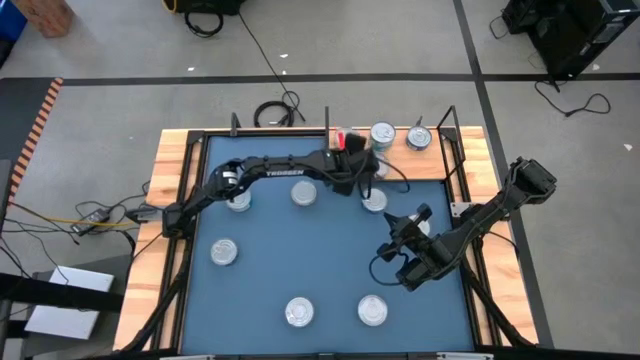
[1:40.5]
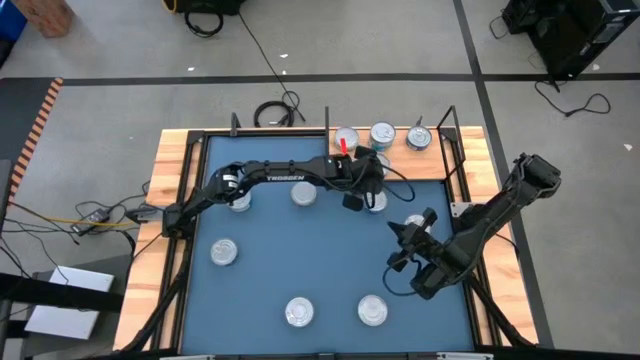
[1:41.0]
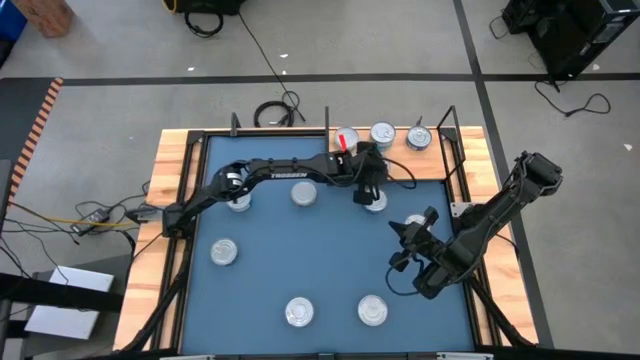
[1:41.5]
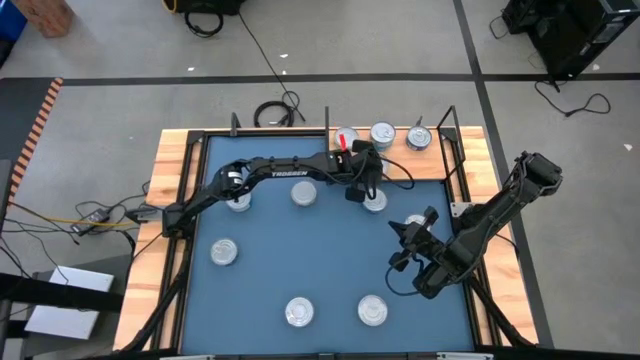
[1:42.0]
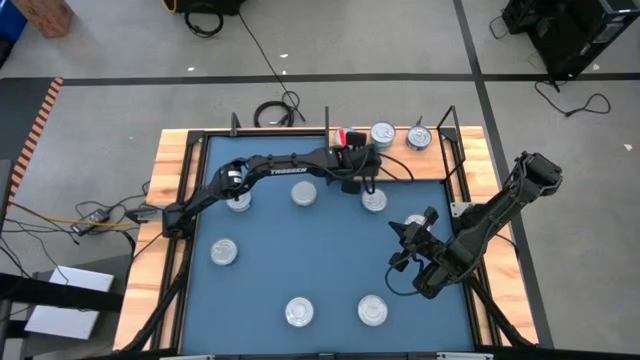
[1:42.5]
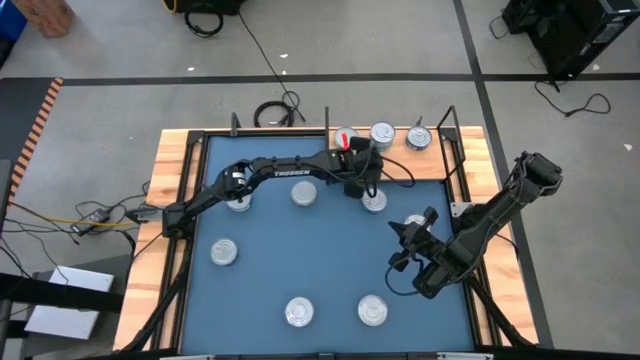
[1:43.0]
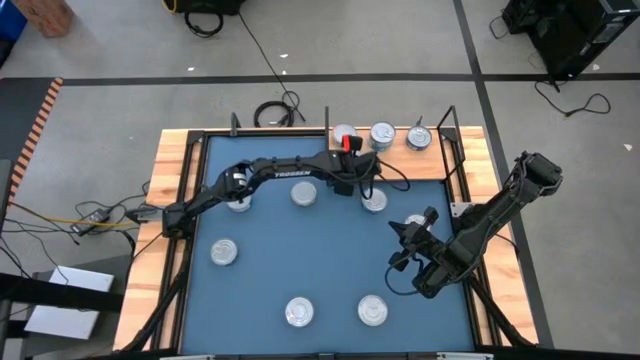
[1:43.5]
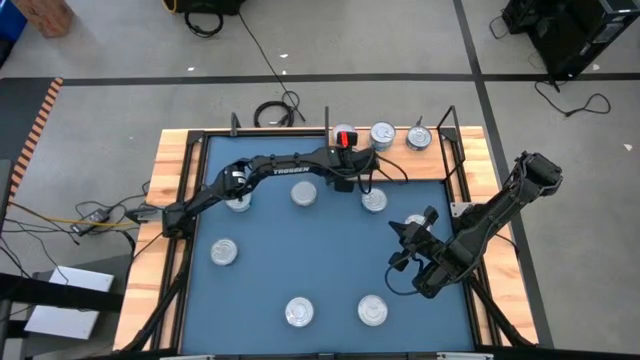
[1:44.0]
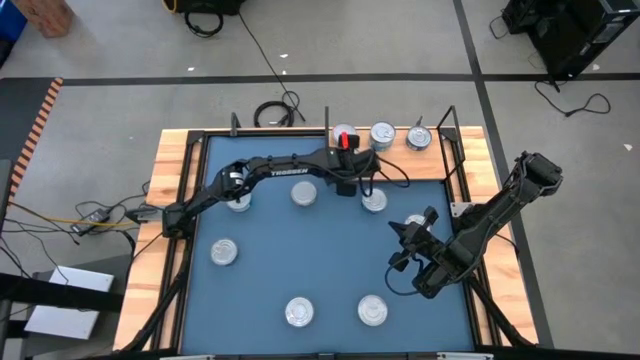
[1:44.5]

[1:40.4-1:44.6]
Task: Stack canned seafood by type on shelf
Adjust the front green tuna can on the shelf

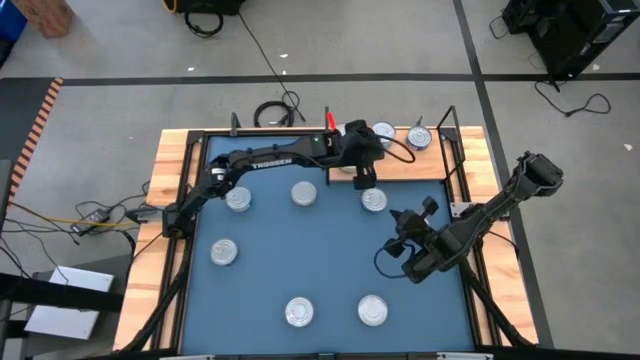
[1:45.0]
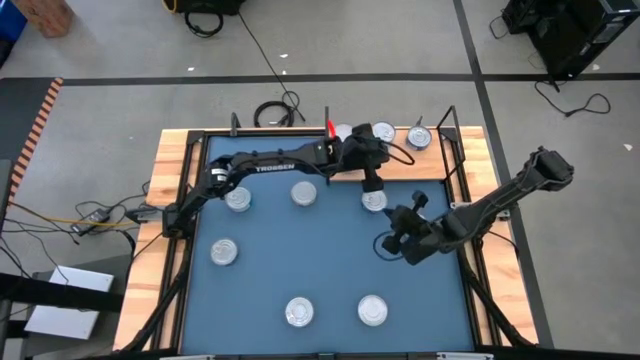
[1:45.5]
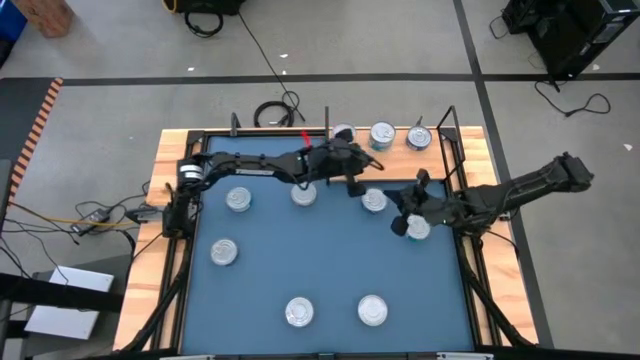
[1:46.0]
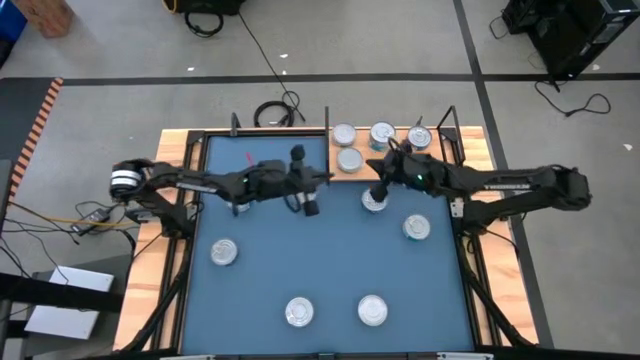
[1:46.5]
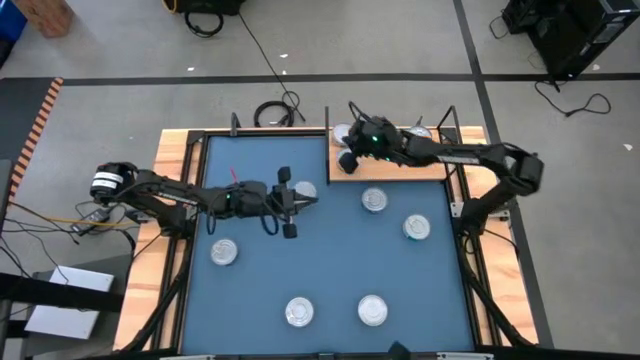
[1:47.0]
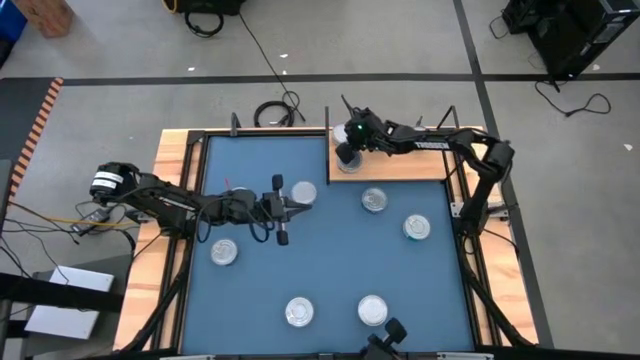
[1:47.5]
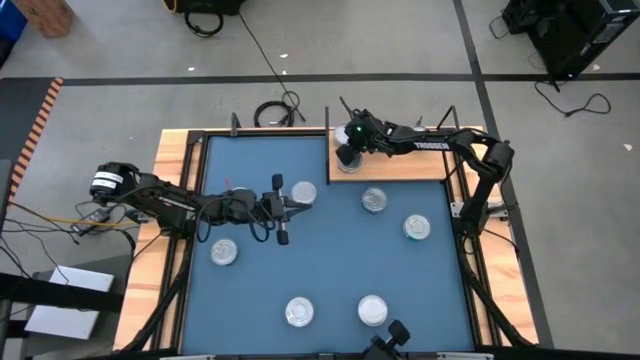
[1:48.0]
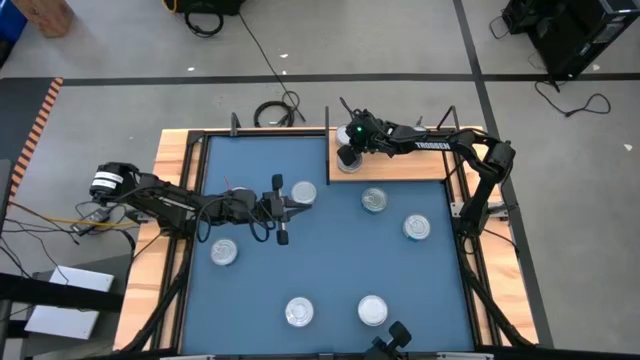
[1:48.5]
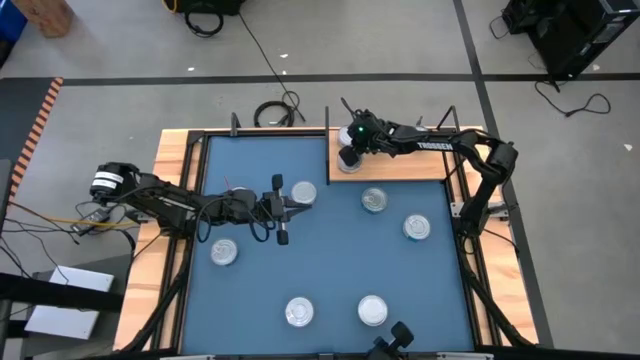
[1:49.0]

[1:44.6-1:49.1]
Adjust the green tuna can on the back of the shelf

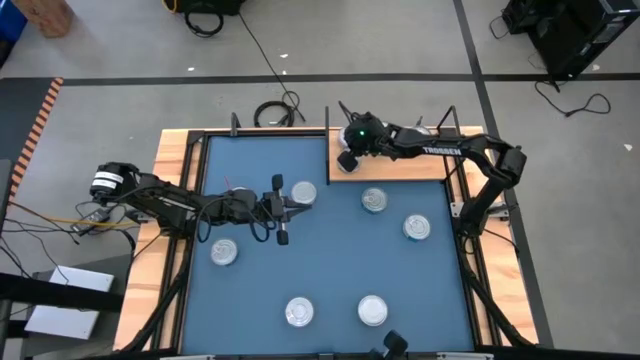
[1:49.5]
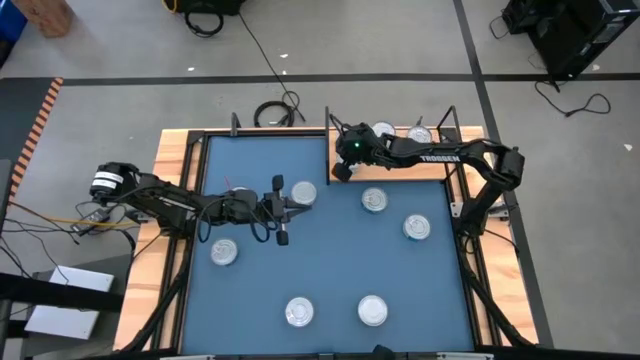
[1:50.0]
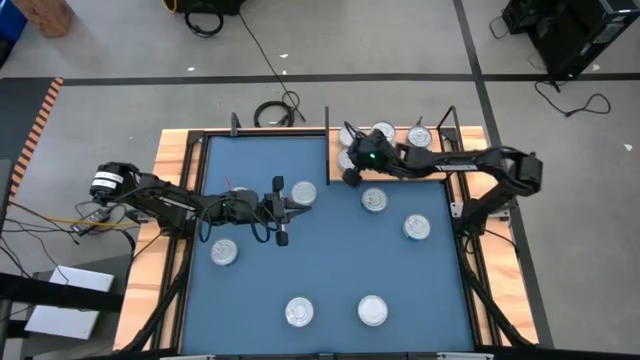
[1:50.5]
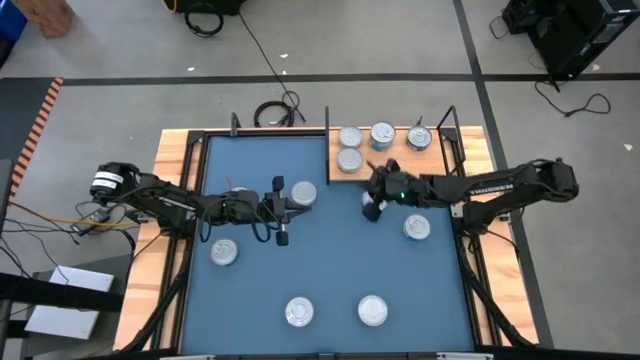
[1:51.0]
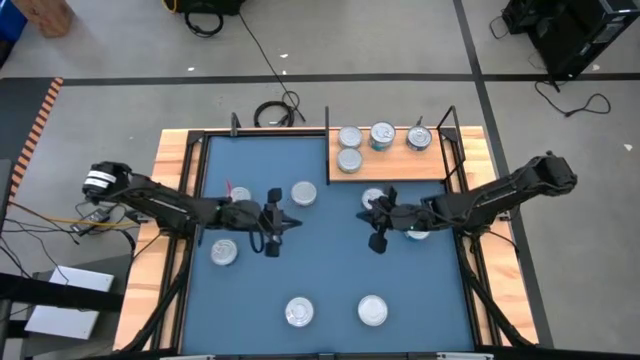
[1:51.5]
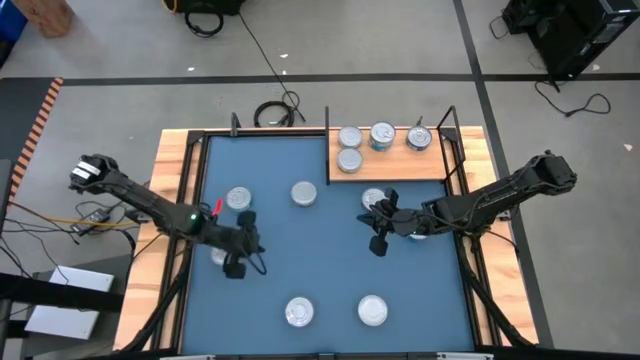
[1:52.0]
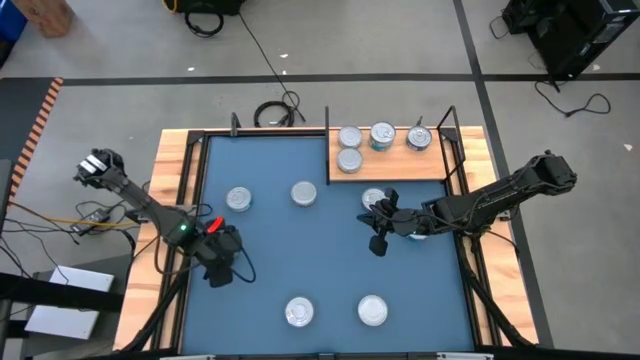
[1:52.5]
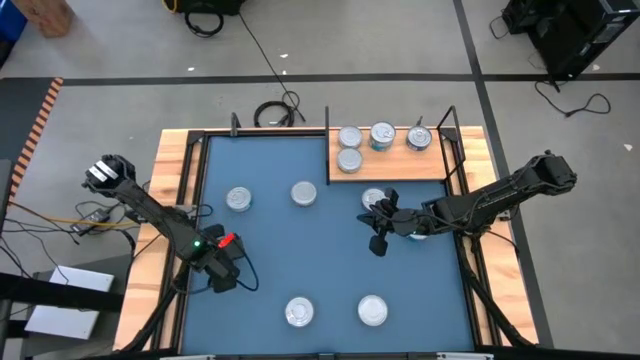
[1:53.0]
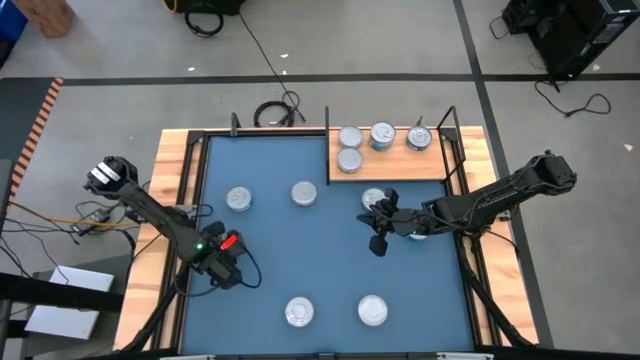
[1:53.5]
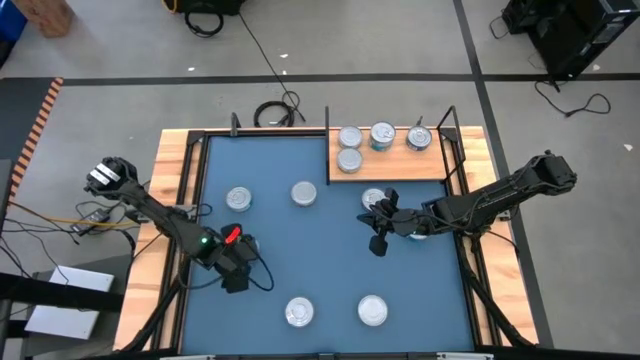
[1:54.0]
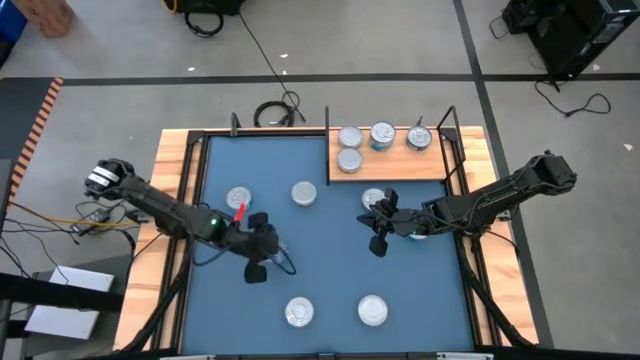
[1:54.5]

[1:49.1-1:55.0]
Stack the left blue tuna can on to the blue tuna can on the shelf

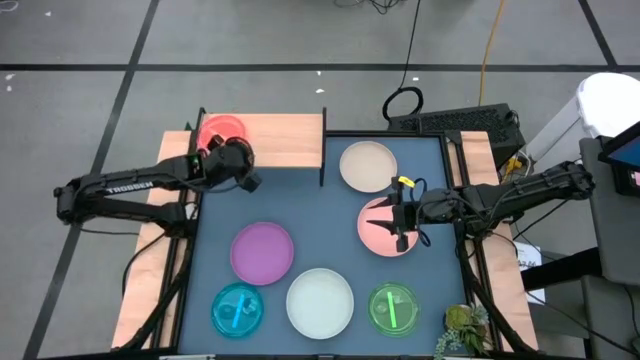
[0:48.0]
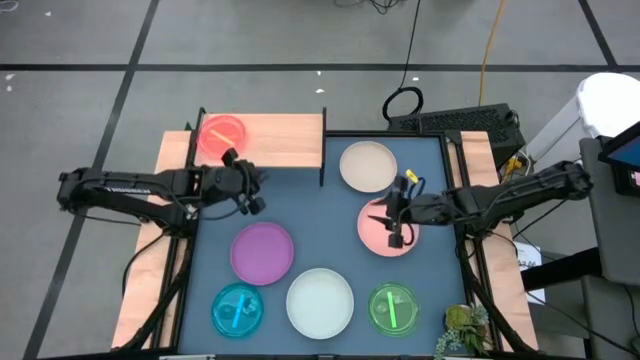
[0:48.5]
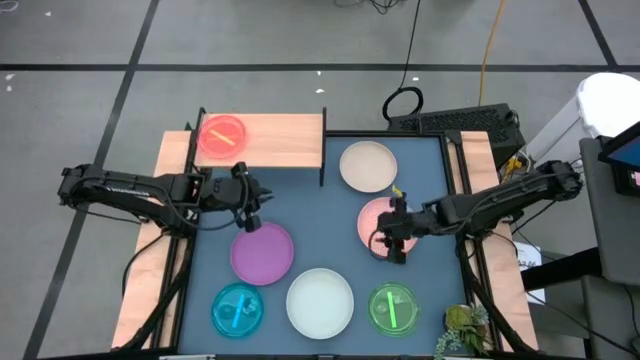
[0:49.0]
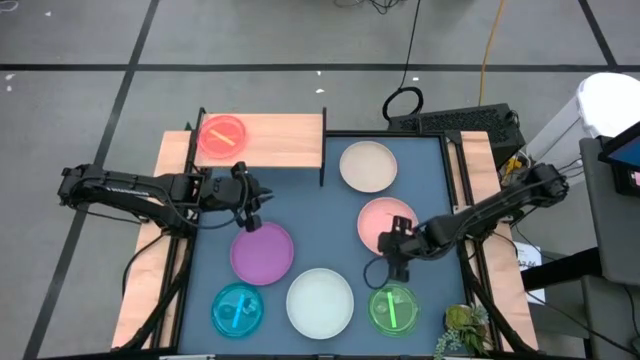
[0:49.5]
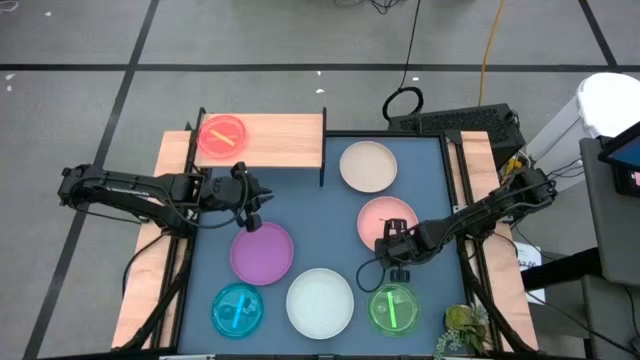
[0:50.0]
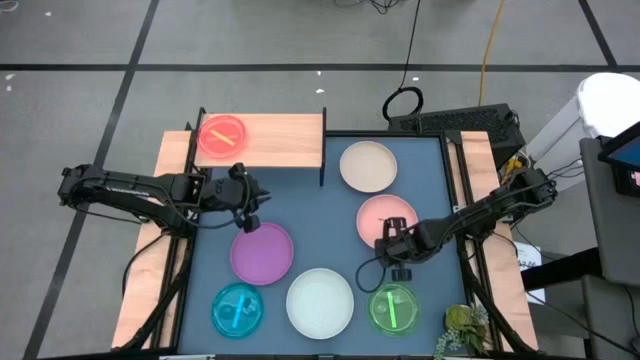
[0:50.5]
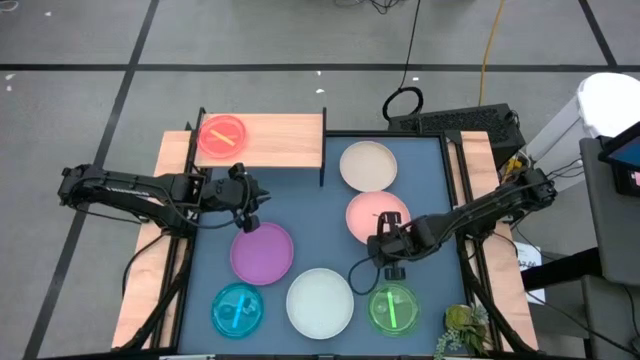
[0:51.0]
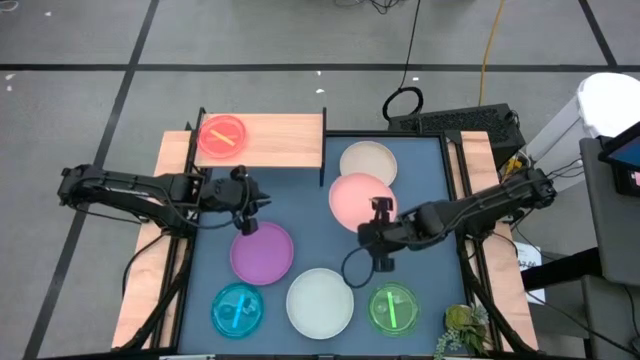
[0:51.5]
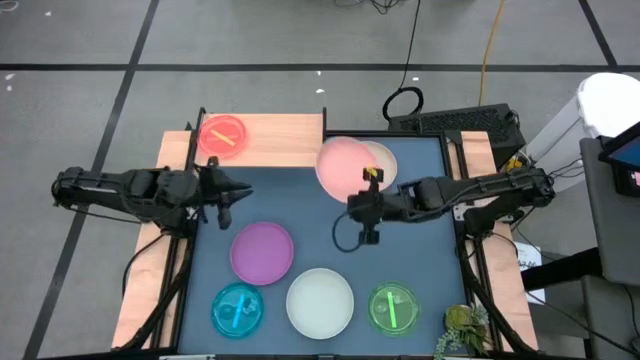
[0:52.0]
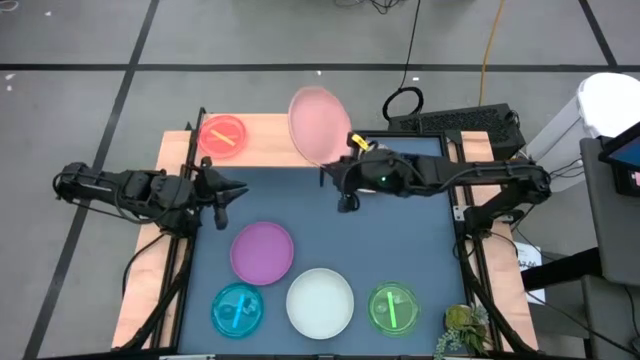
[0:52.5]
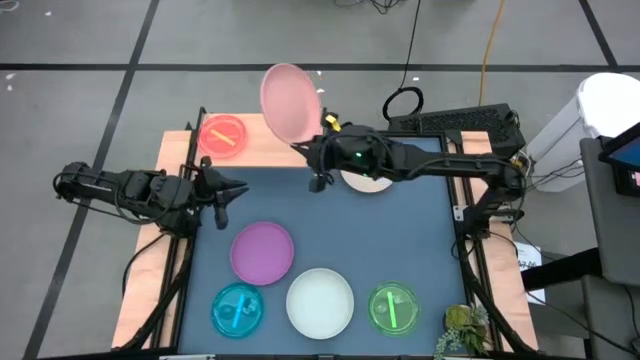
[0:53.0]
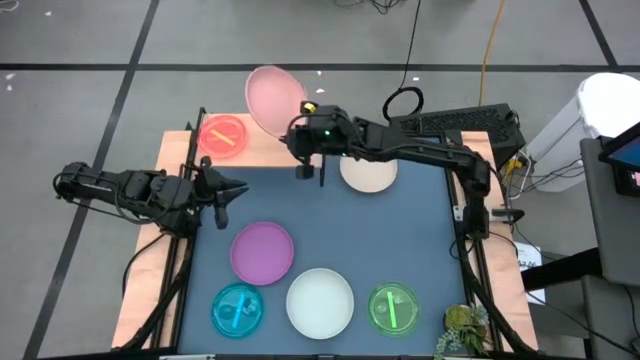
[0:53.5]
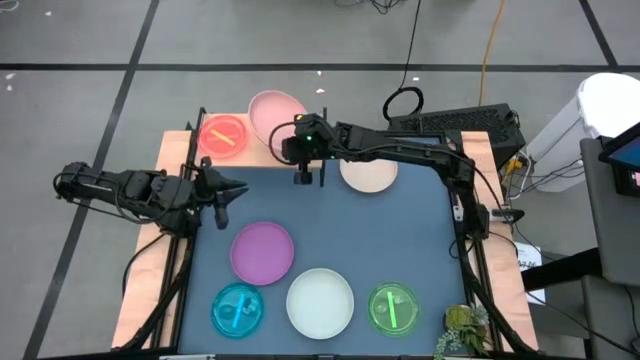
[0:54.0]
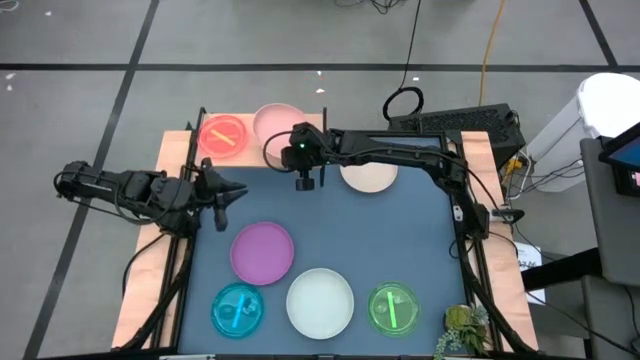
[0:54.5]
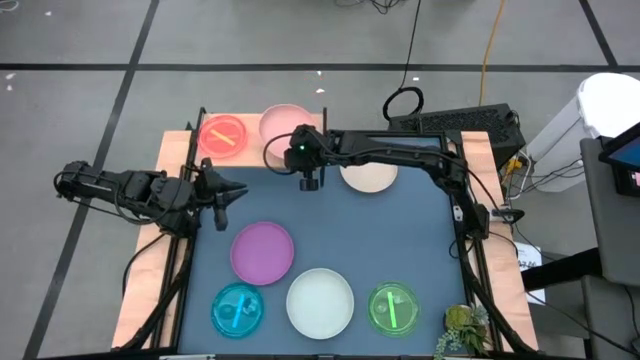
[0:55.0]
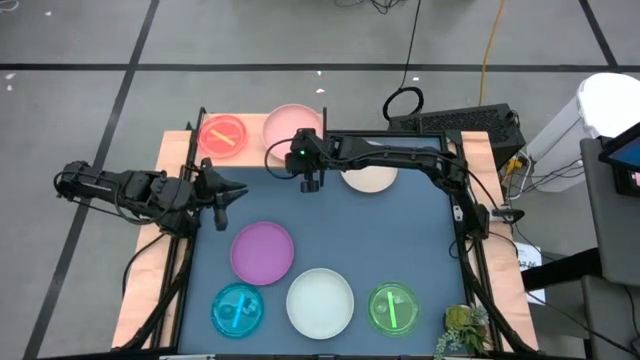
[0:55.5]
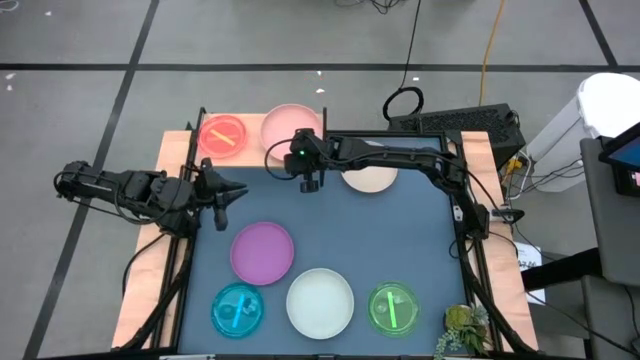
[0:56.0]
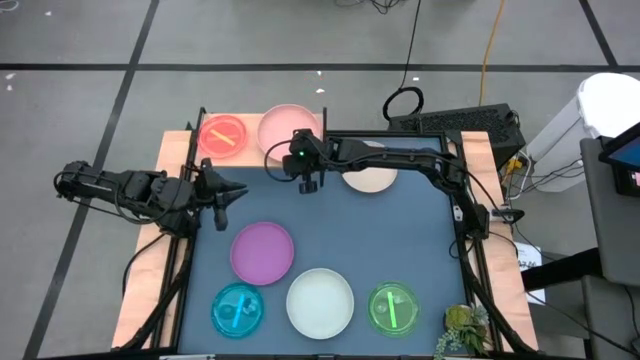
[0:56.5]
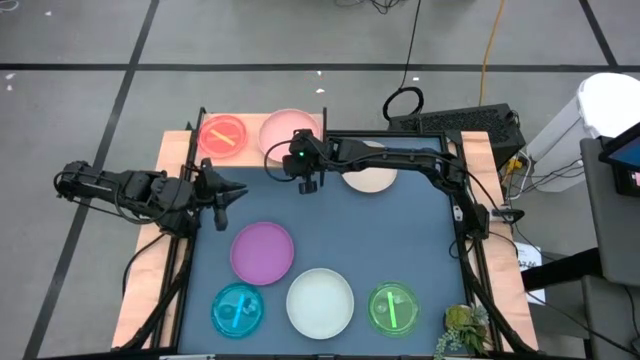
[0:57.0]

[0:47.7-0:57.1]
Task: Place and stack plates onto a shelf
Put the pink plate on the shelf
